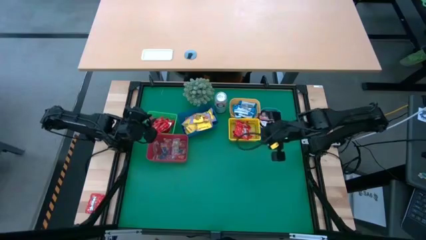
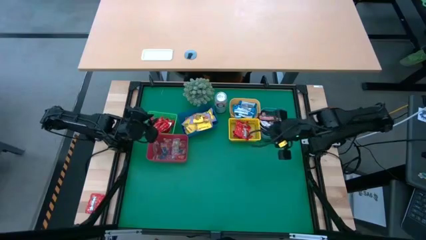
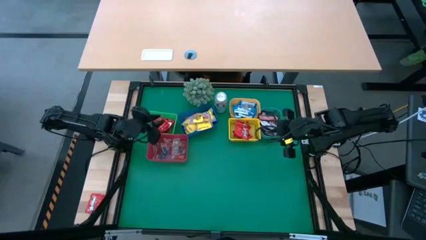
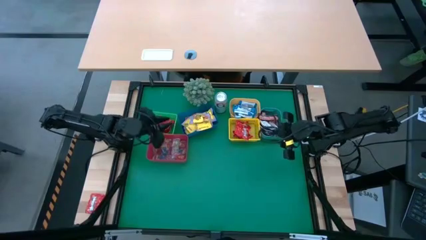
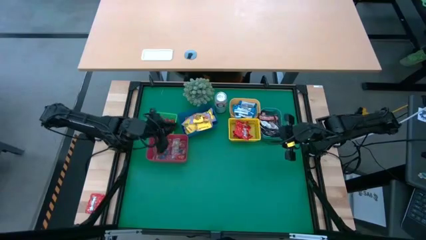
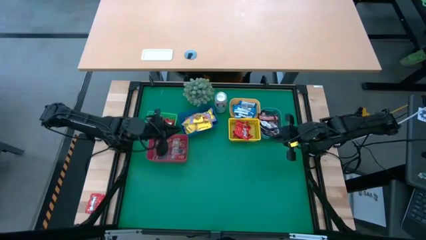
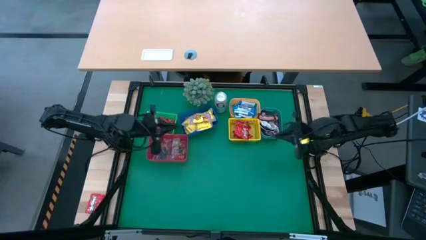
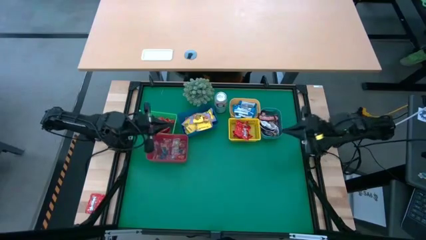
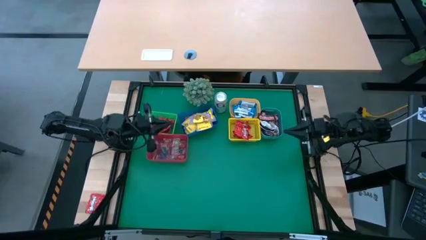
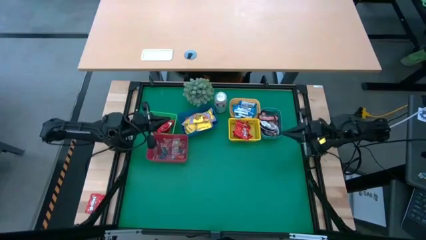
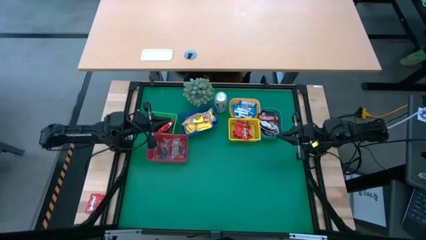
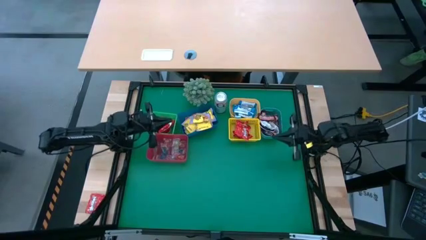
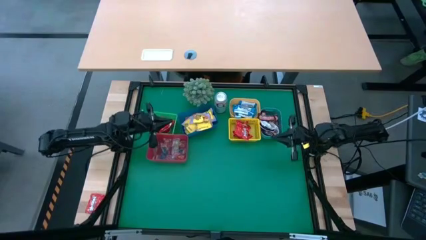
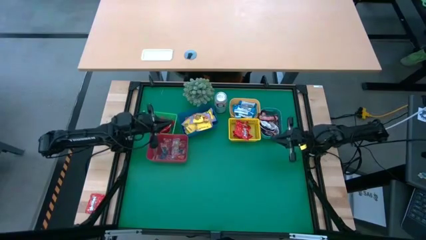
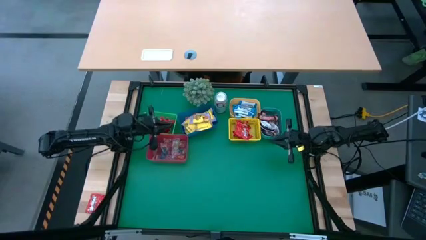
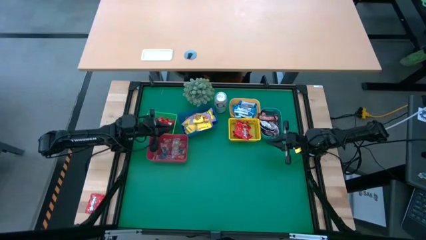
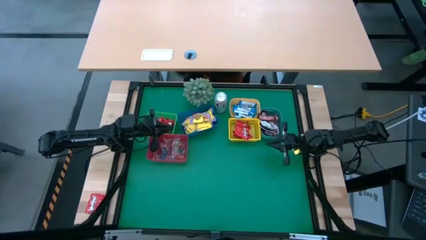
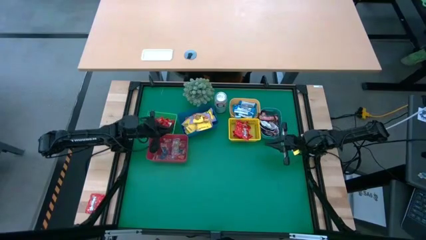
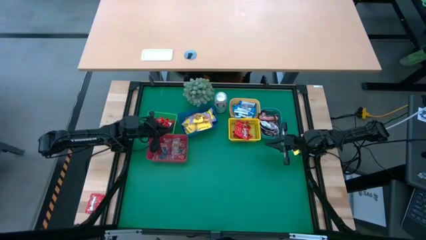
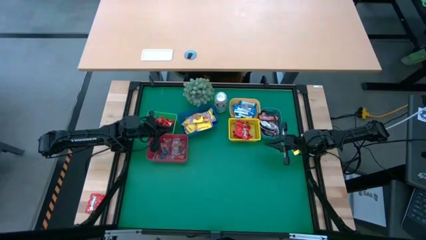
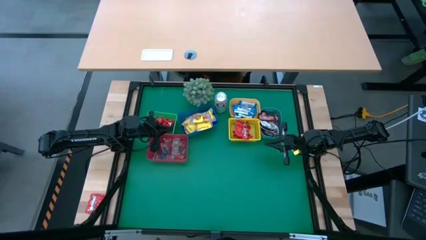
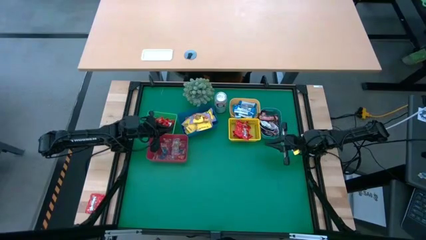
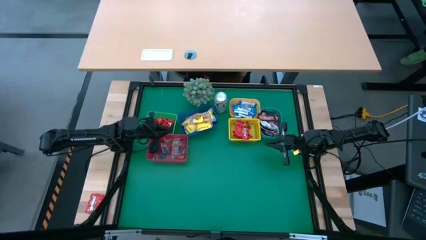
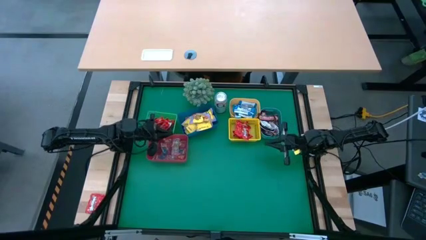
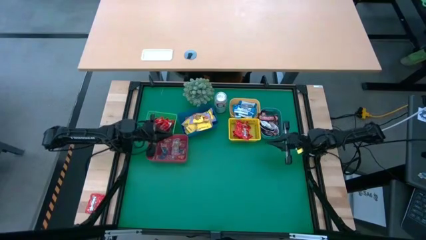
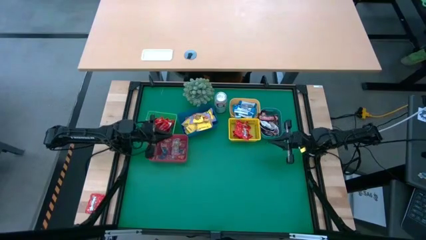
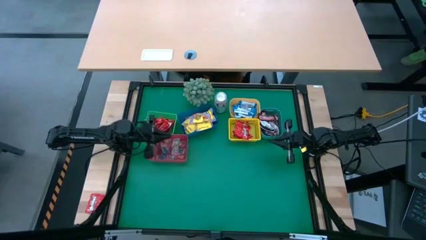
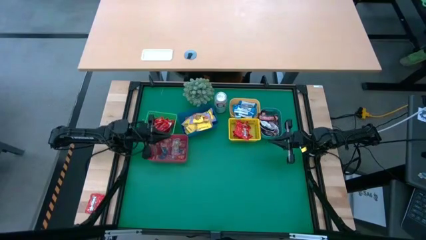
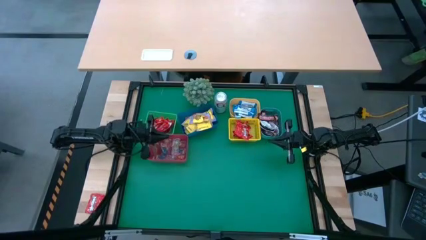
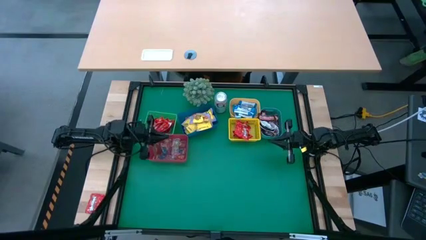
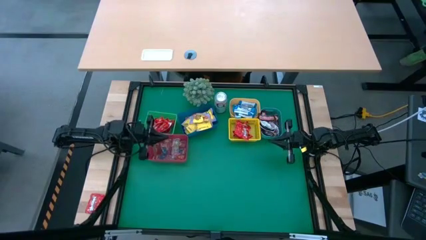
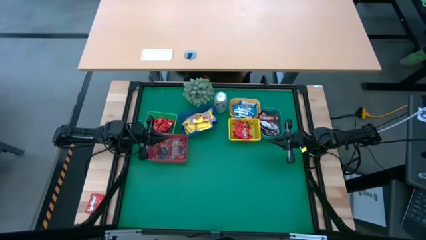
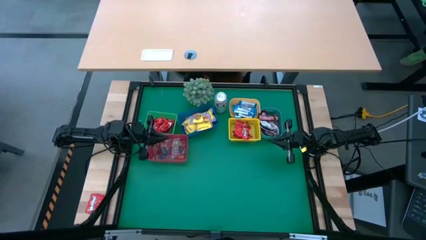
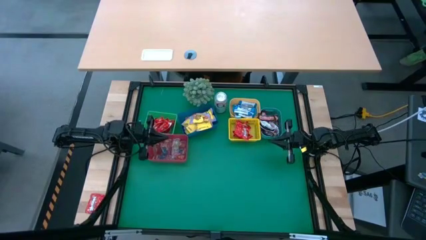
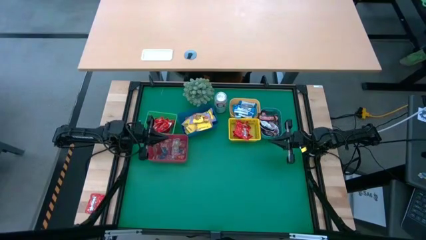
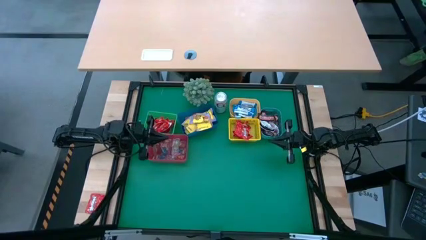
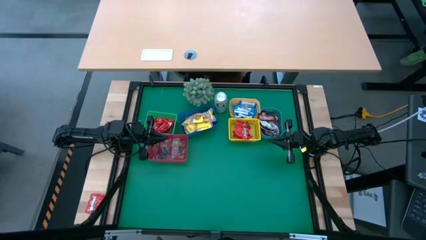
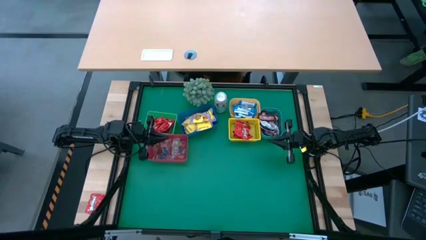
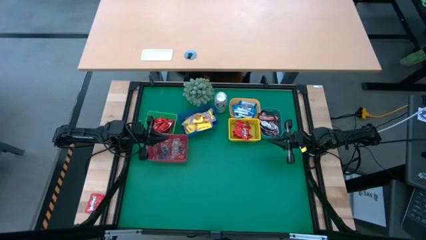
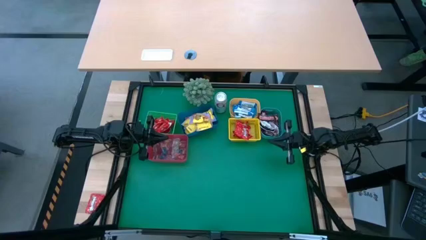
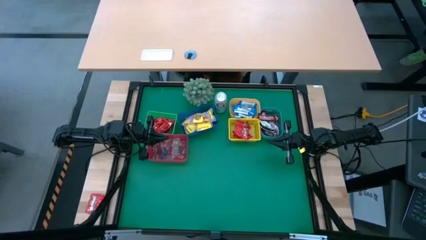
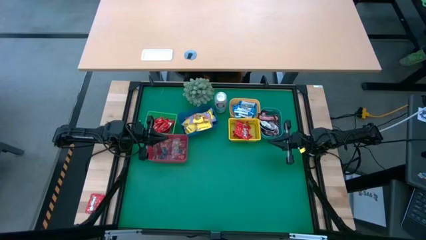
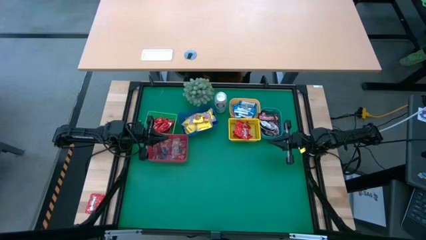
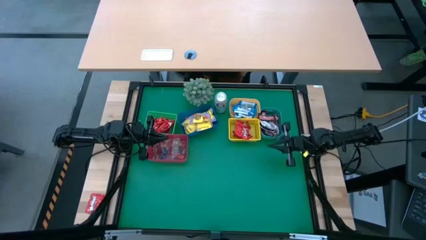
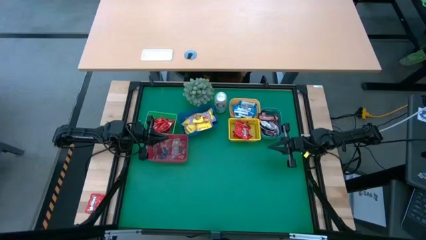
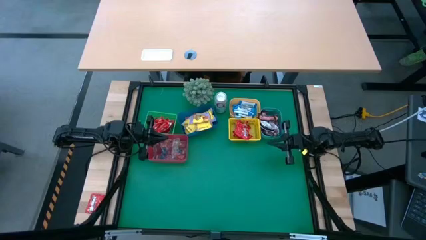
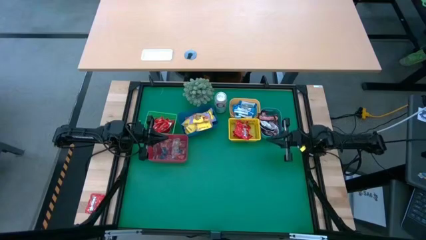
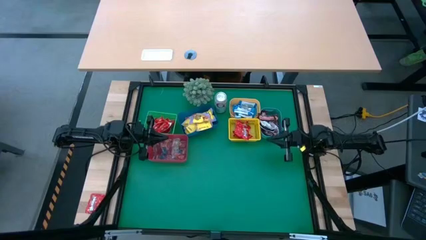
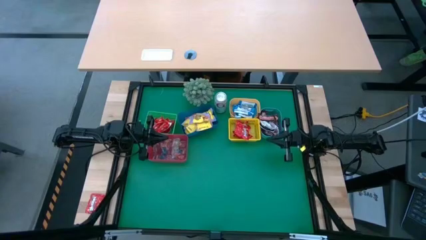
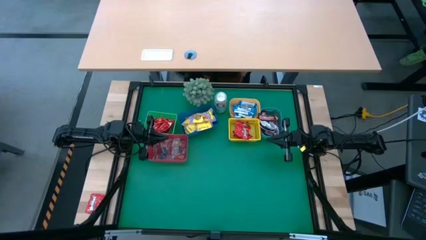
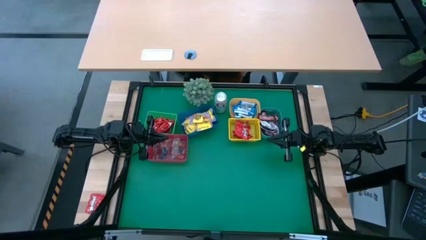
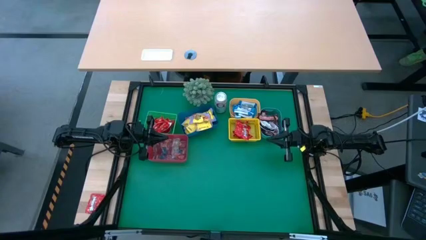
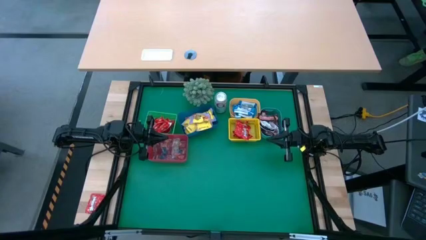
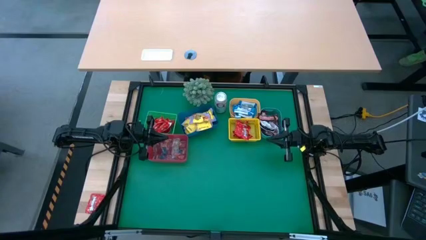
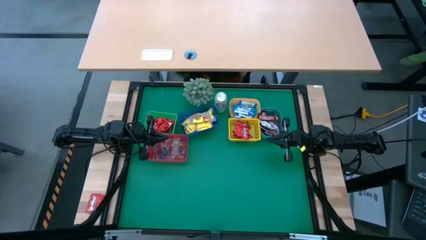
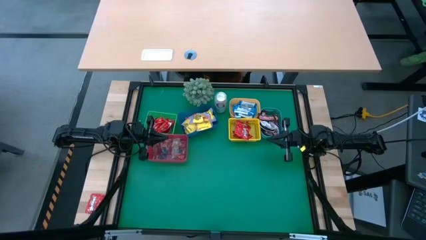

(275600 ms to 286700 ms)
Task: Sort candy
Return to Home Position
